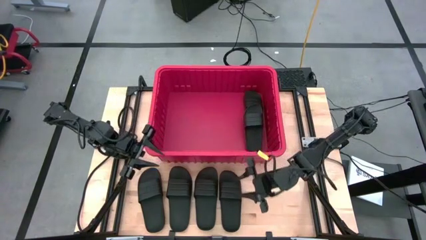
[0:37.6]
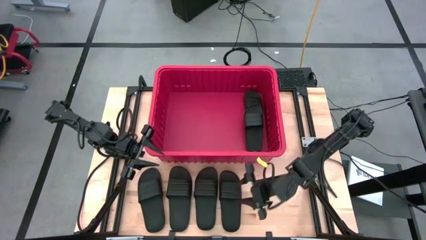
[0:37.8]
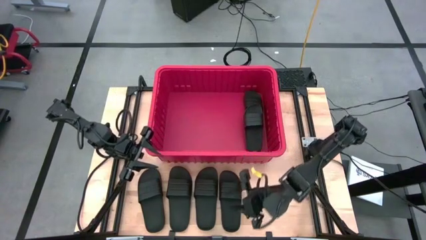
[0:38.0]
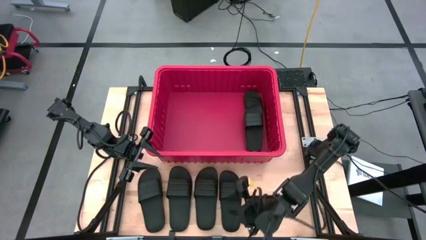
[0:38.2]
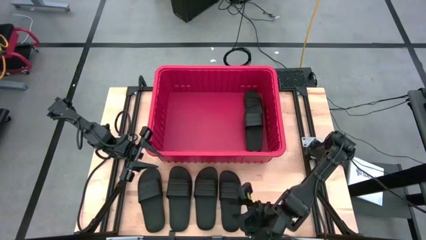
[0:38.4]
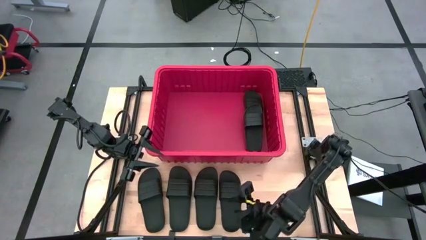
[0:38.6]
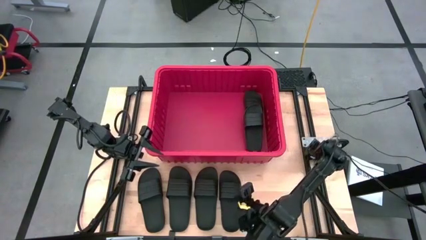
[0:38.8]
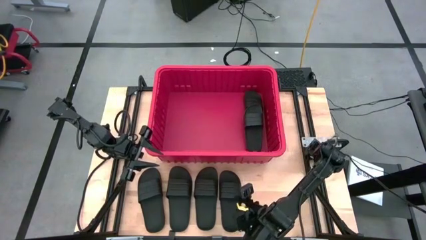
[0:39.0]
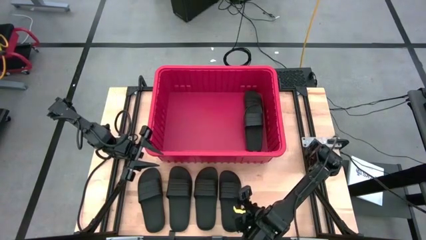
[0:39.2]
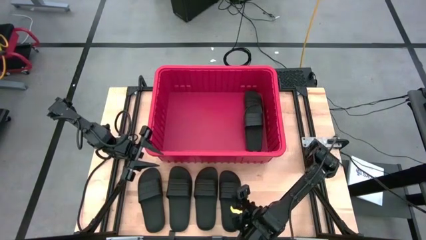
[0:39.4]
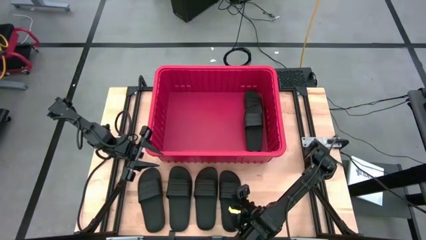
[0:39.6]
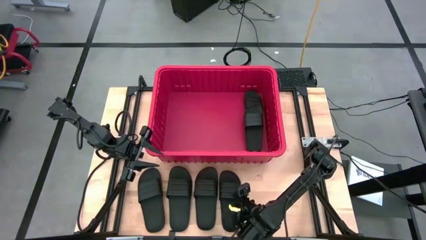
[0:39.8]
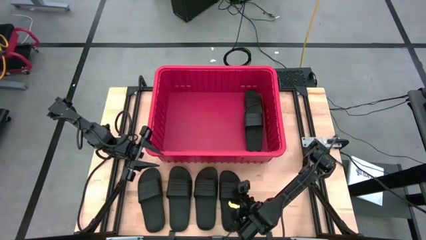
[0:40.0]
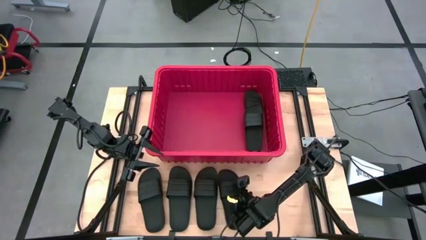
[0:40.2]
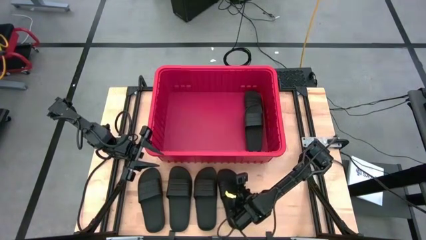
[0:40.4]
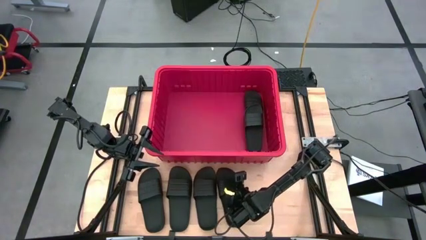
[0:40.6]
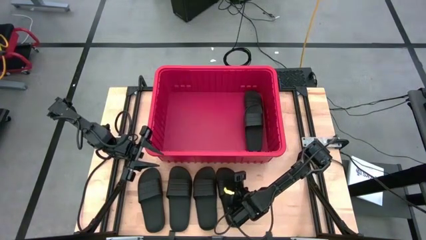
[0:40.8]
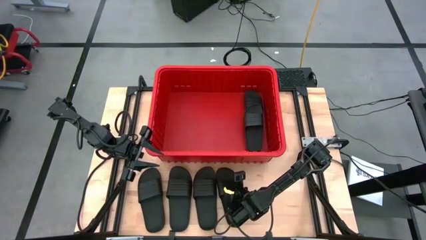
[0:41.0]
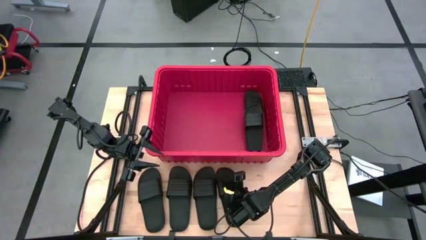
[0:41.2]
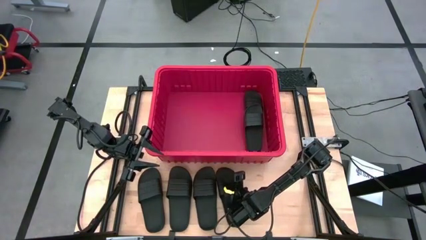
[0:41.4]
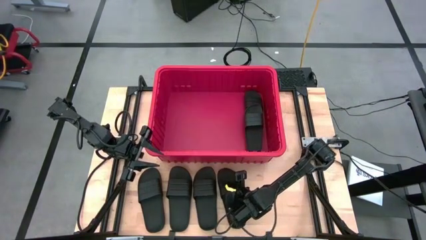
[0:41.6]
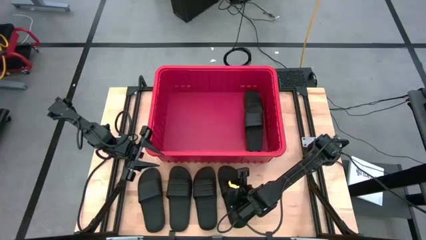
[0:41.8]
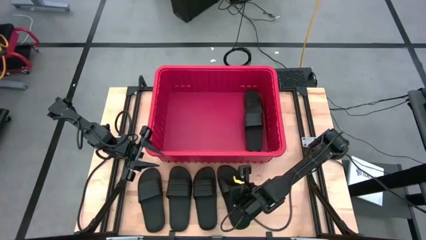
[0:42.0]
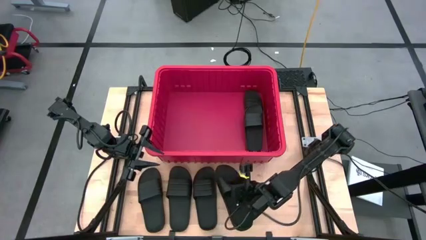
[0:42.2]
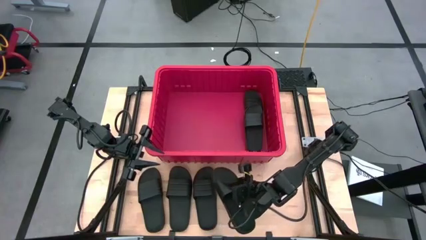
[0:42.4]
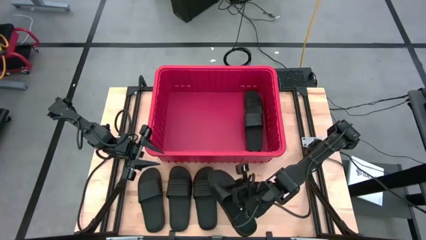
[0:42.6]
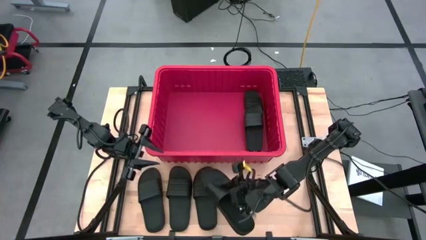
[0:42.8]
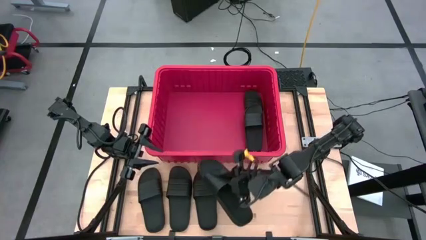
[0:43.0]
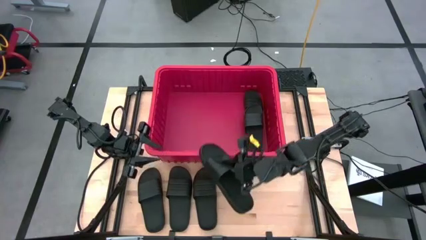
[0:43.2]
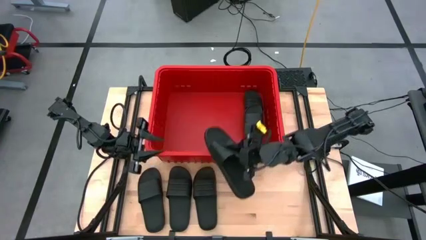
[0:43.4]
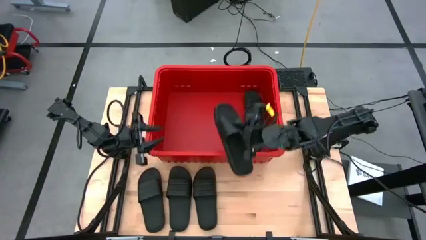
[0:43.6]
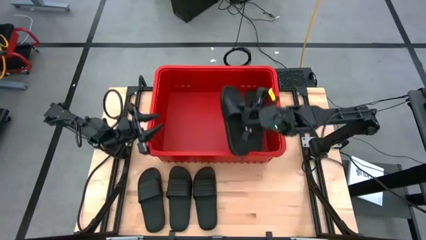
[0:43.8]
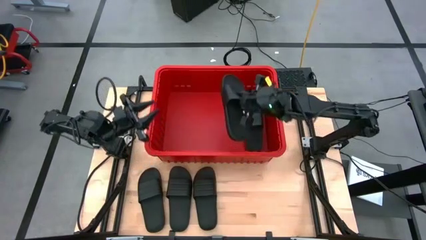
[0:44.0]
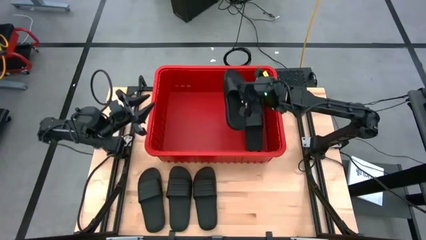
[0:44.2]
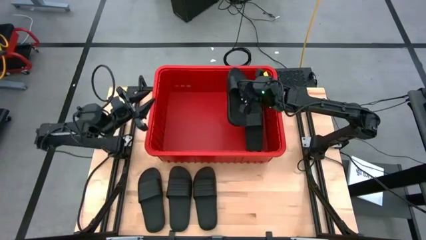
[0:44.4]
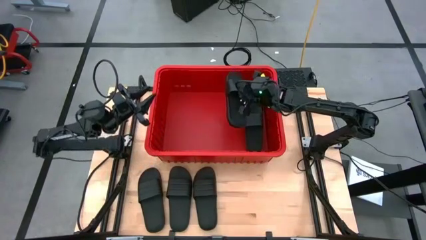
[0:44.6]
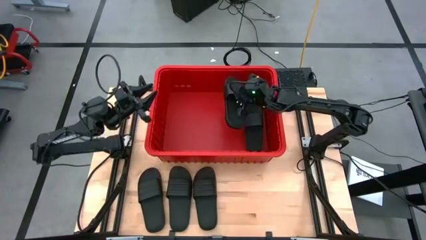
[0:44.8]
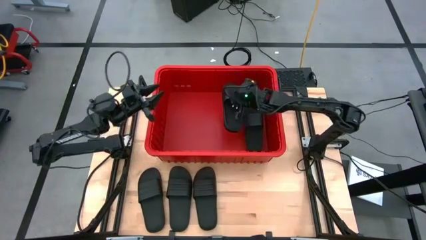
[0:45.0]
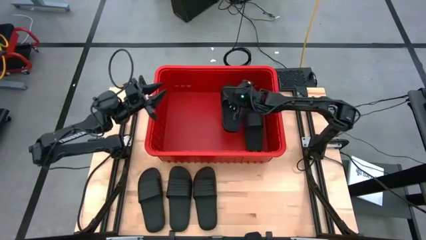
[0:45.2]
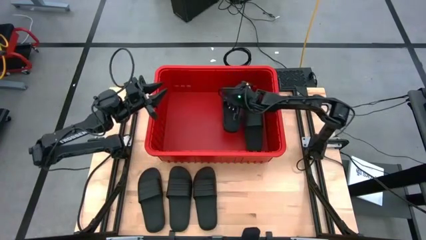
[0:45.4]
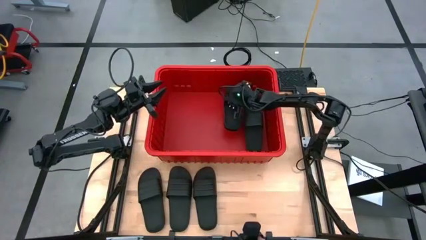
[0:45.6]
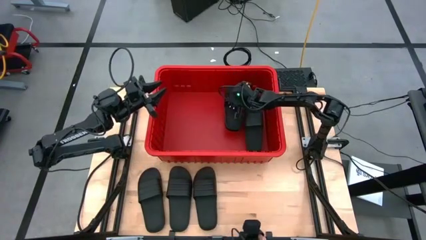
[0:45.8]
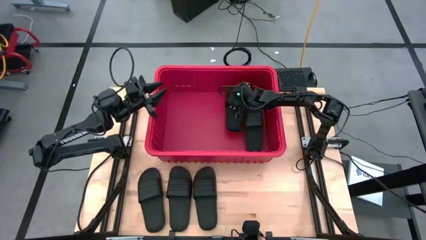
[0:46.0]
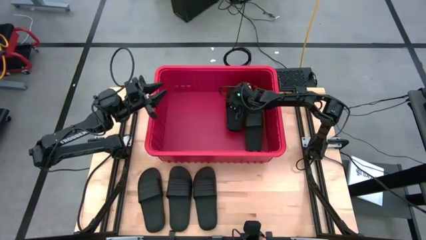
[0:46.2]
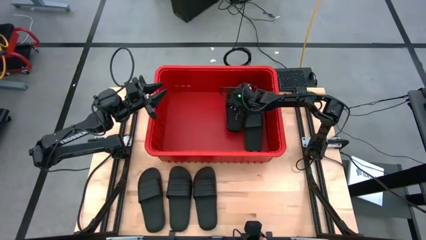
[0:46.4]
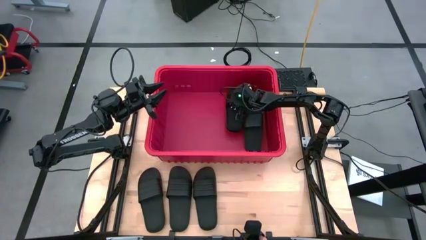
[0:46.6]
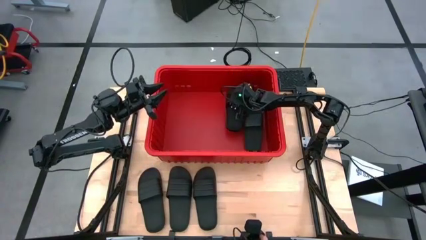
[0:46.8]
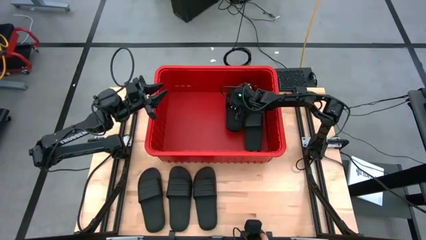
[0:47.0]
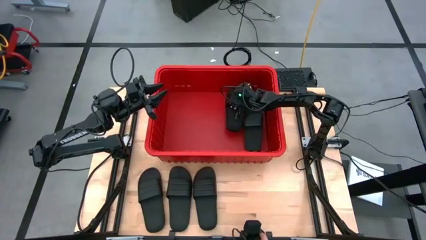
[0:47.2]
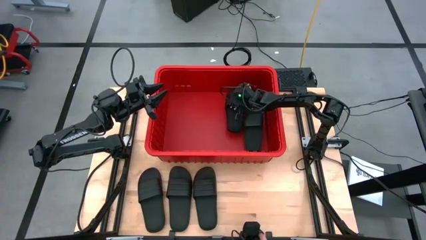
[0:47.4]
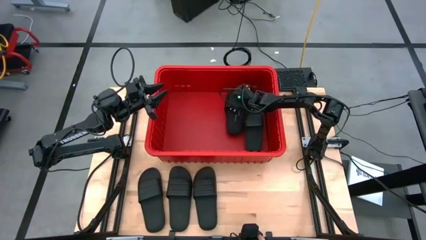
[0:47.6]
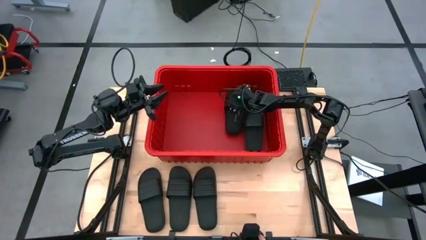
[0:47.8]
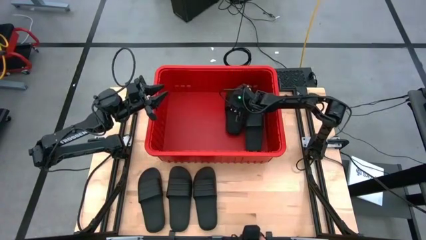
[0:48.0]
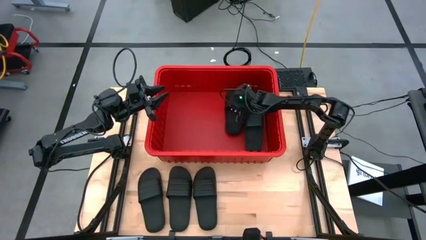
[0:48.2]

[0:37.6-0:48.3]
Task: Pick and place slides into bin
Put the black slide into the red bin

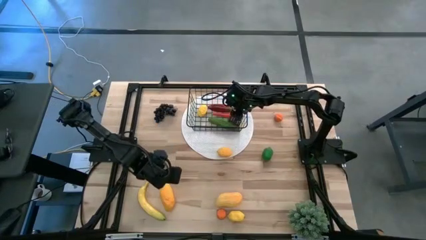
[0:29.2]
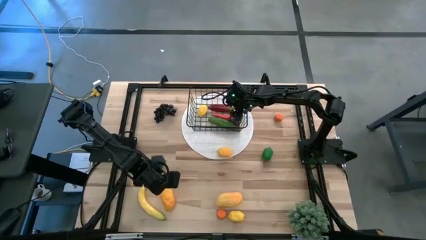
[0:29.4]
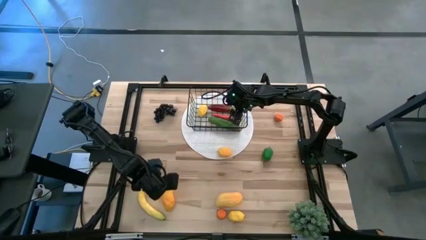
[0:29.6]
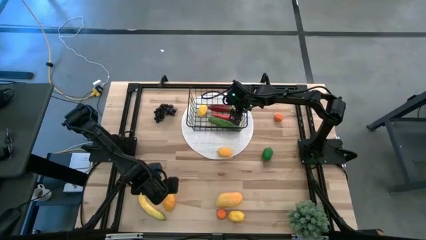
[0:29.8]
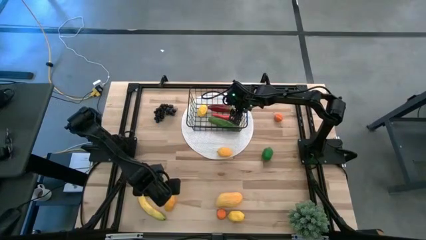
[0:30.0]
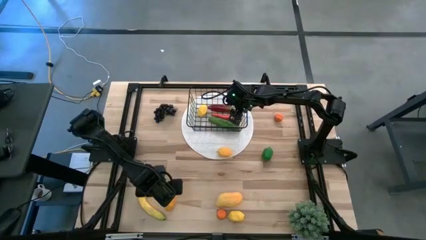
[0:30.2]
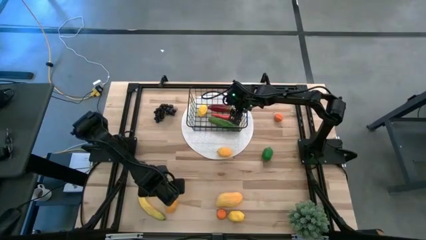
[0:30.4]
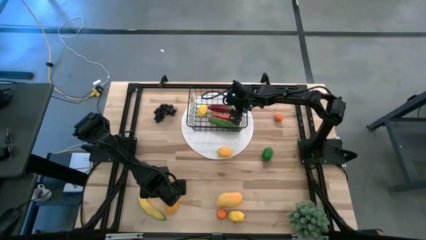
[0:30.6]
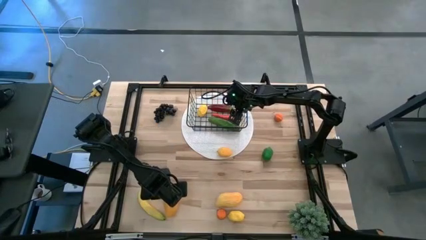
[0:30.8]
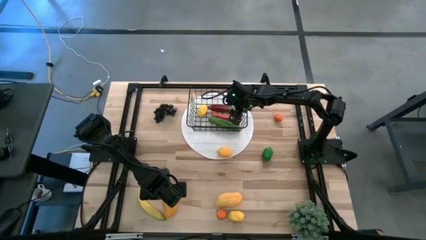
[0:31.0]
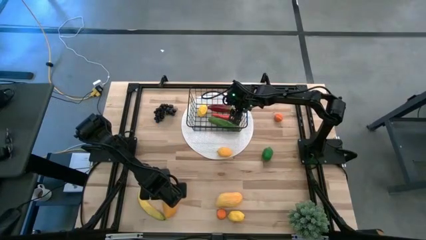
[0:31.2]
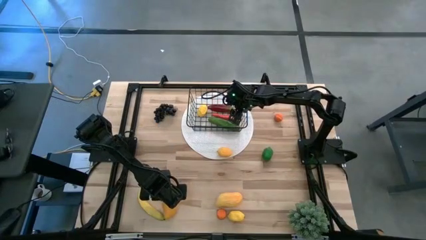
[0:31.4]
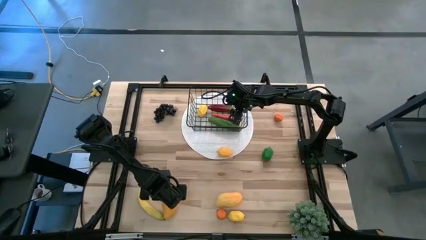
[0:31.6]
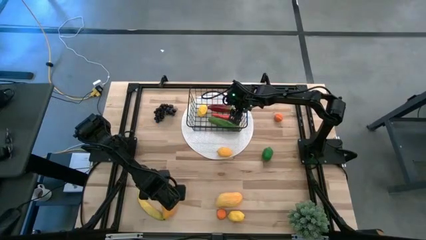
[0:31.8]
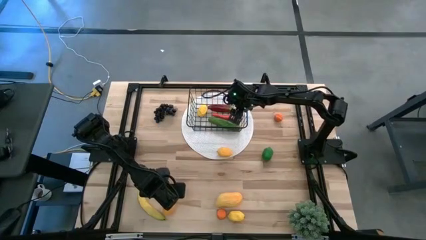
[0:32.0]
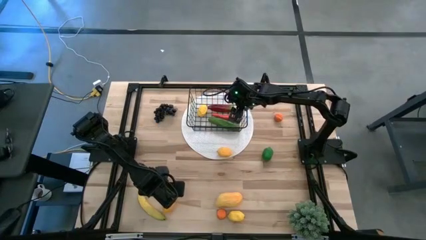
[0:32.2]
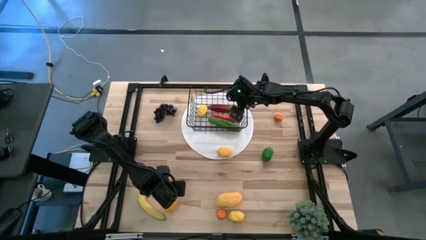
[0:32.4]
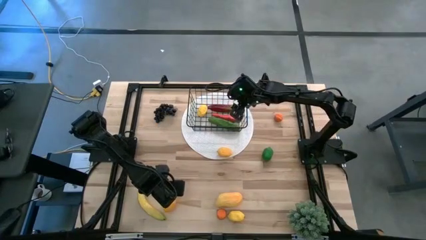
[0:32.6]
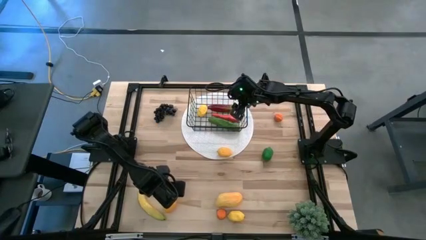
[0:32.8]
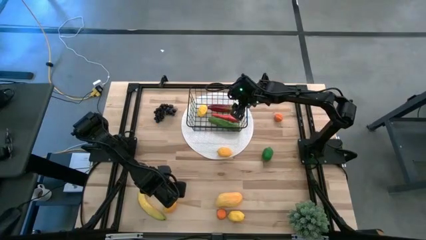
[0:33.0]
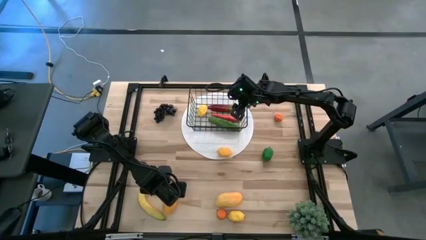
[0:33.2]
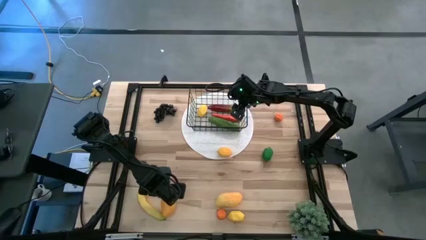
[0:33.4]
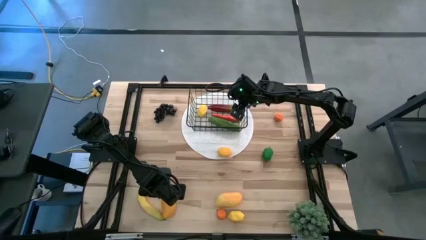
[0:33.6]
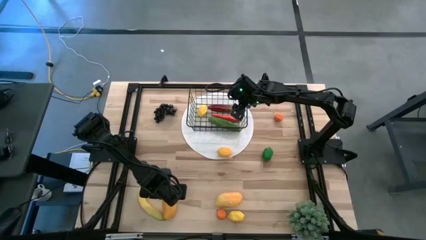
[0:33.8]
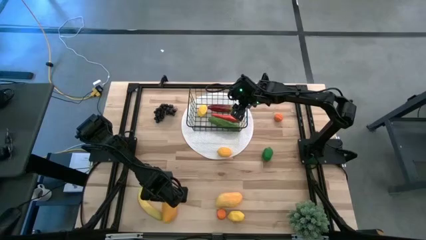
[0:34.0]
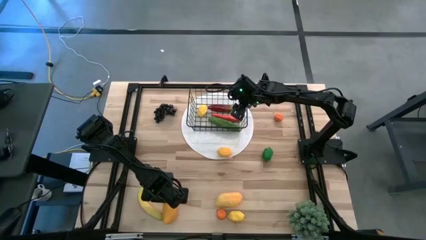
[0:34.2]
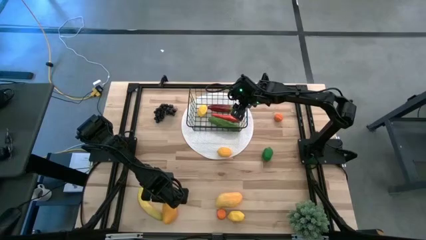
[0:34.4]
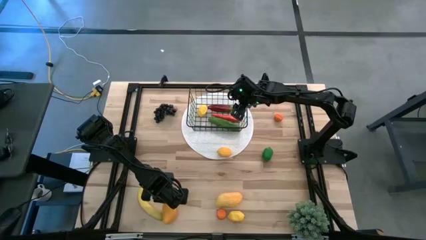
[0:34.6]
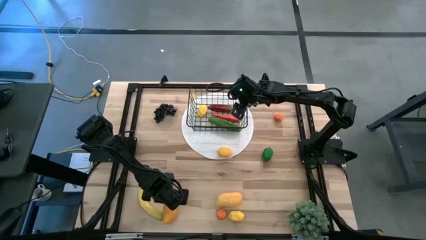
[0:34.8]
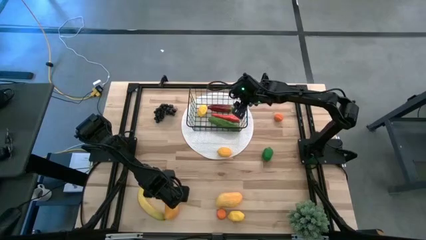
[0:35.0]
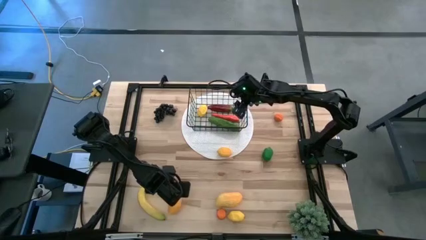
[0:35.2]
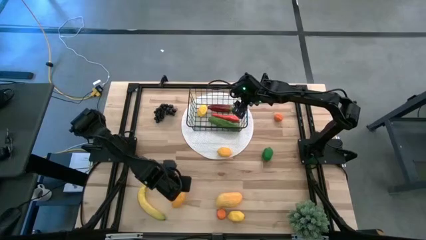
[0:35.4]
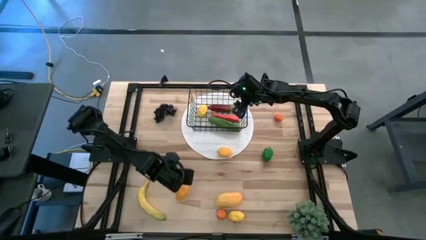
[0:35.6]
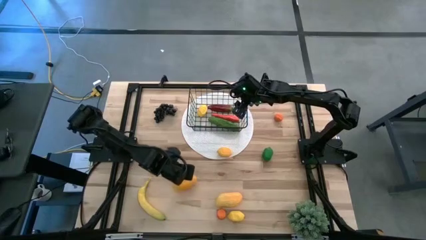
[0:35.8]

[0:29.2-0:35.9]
Task: Build produce basket
Put the left yellow mango into the black wire basket
